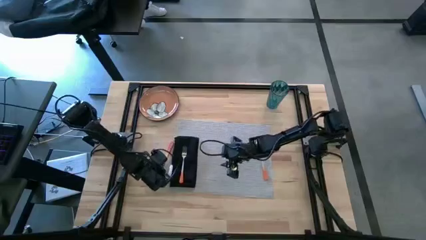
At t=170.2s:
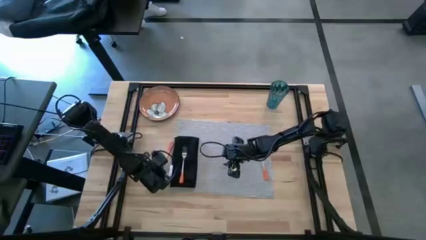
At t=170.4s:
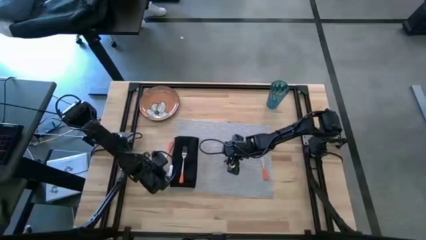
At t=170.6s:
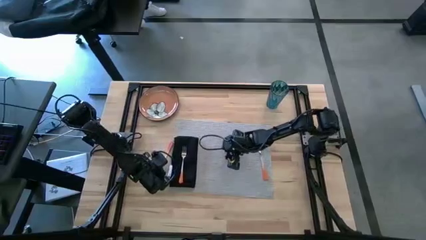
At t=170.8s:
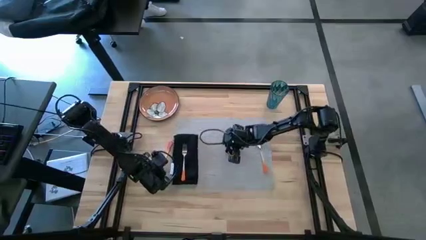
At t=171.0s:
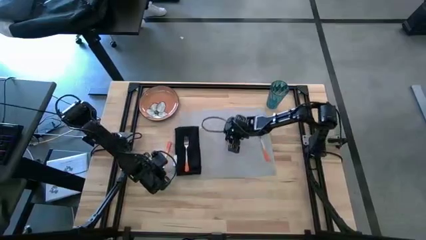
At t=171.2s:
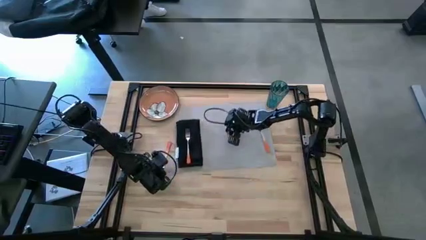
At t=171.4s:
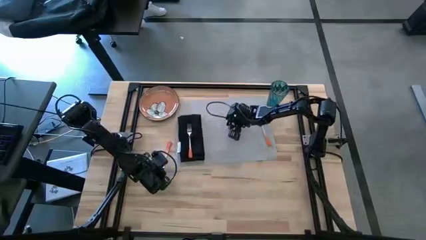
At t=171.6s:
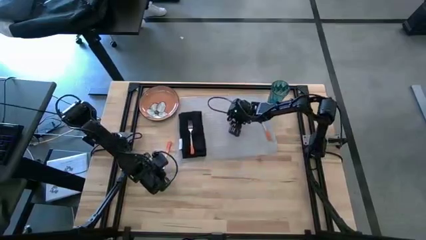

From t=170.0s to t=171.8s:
Task: Set table place
Move the gray table mat to the top of the table in between the green cup and the orange plate

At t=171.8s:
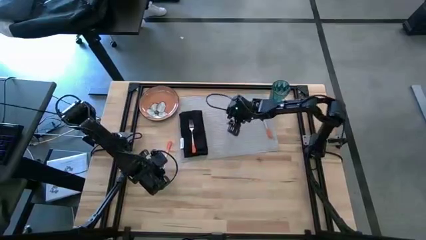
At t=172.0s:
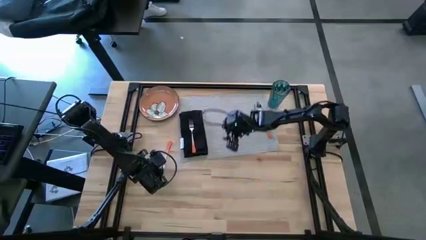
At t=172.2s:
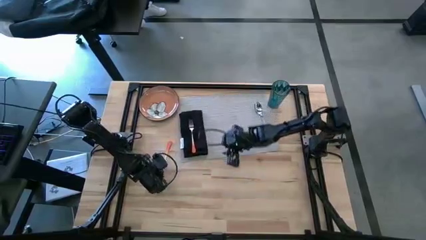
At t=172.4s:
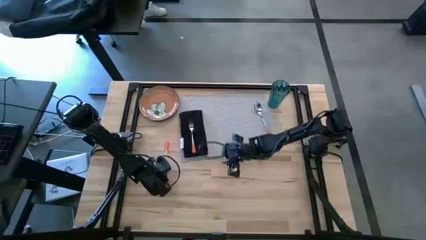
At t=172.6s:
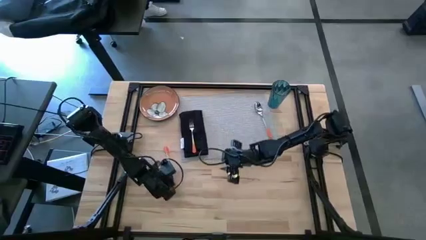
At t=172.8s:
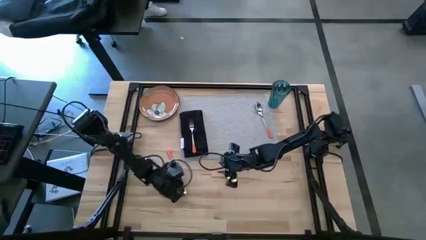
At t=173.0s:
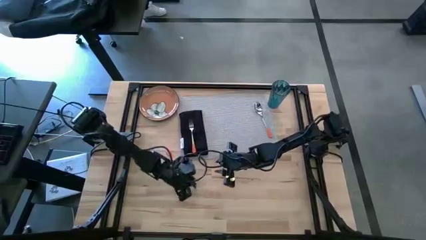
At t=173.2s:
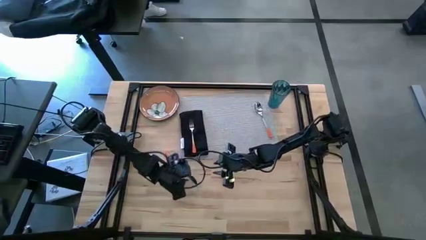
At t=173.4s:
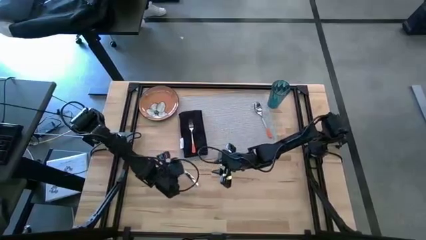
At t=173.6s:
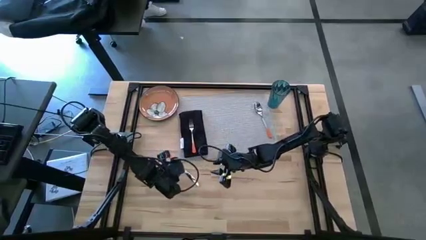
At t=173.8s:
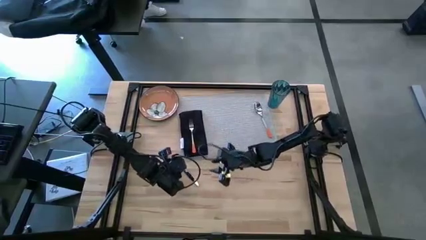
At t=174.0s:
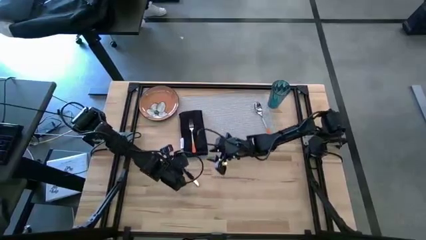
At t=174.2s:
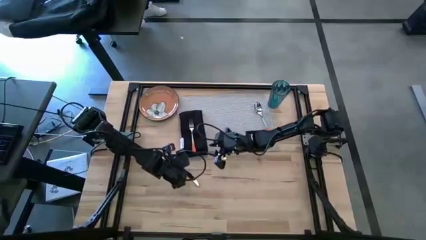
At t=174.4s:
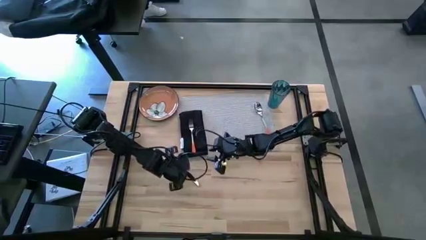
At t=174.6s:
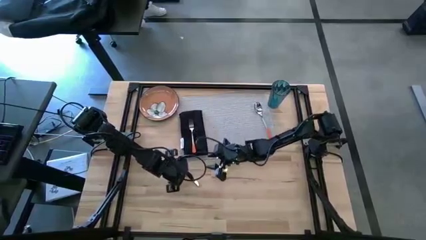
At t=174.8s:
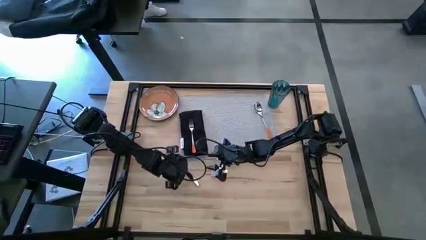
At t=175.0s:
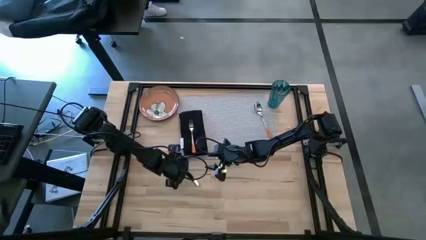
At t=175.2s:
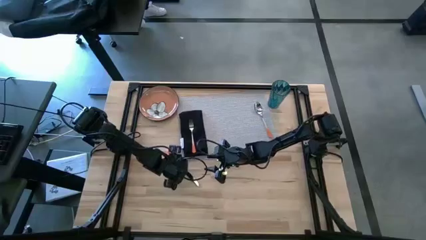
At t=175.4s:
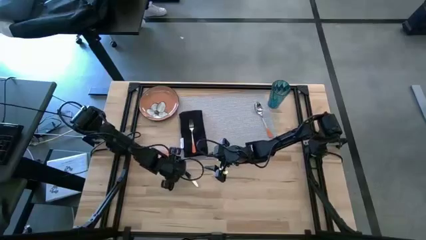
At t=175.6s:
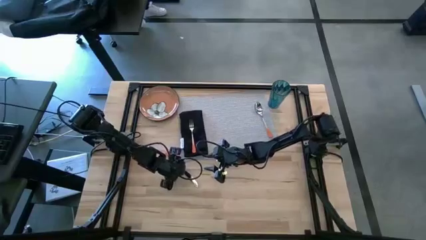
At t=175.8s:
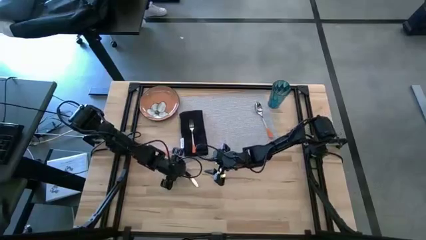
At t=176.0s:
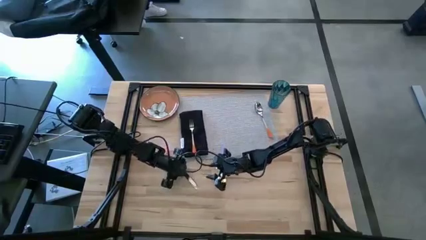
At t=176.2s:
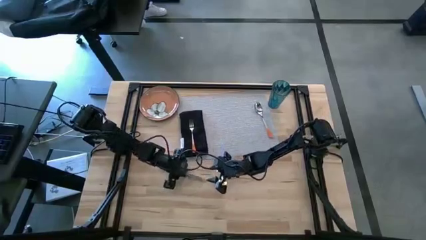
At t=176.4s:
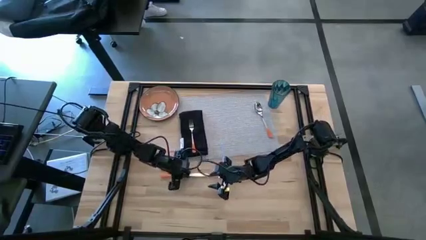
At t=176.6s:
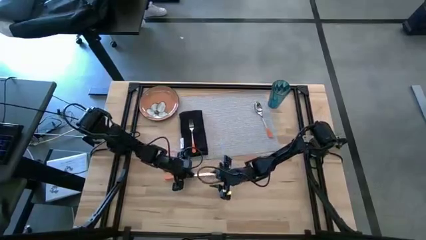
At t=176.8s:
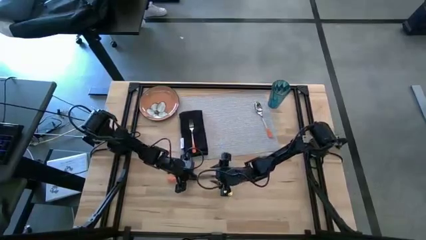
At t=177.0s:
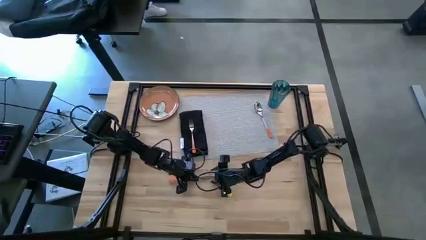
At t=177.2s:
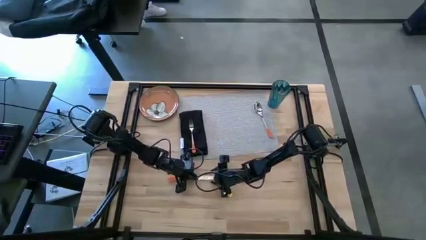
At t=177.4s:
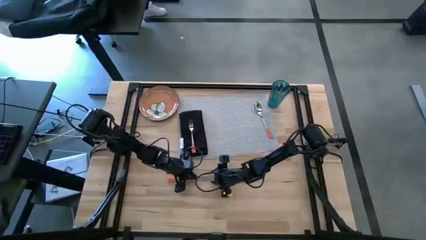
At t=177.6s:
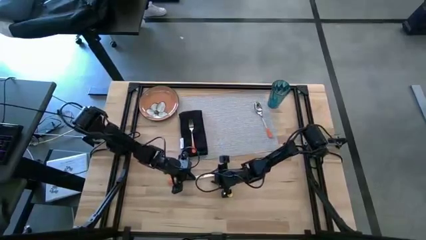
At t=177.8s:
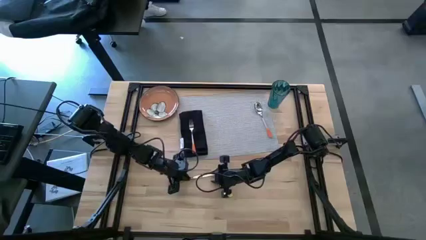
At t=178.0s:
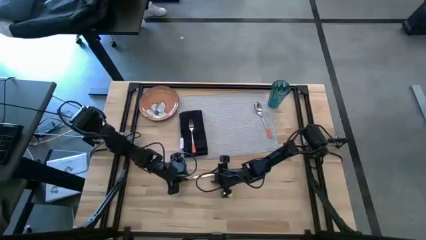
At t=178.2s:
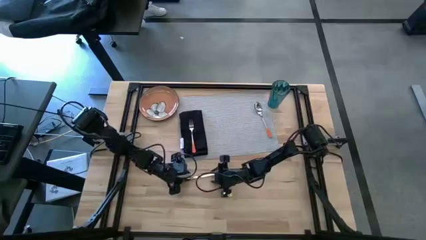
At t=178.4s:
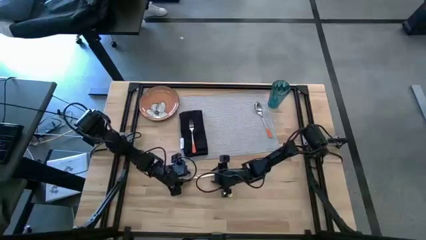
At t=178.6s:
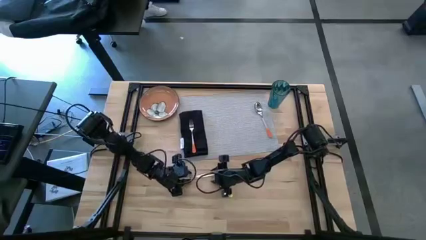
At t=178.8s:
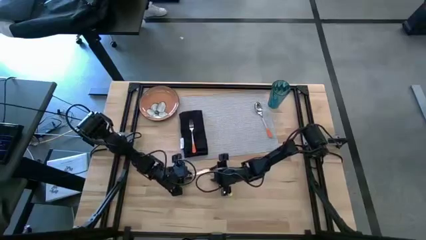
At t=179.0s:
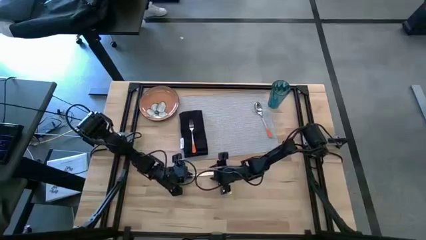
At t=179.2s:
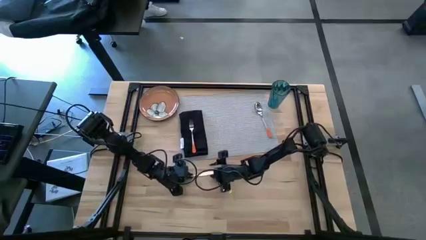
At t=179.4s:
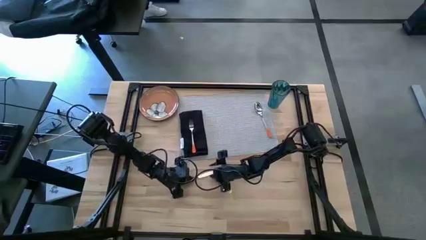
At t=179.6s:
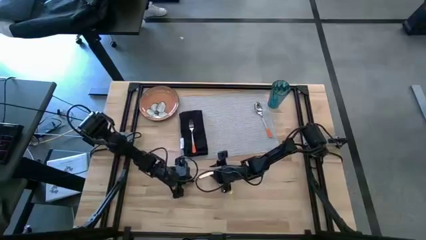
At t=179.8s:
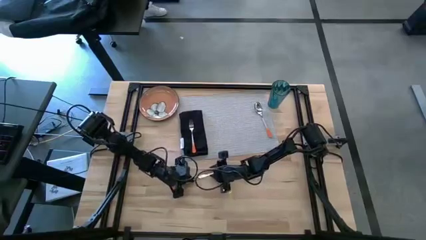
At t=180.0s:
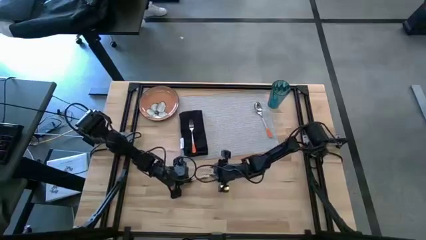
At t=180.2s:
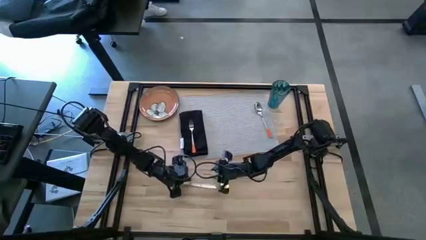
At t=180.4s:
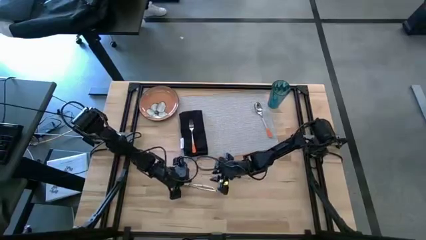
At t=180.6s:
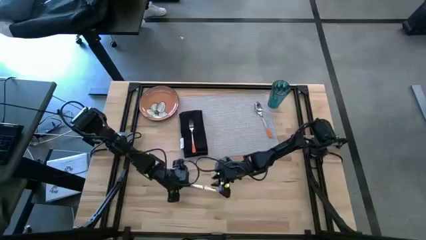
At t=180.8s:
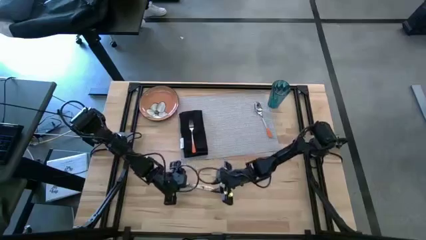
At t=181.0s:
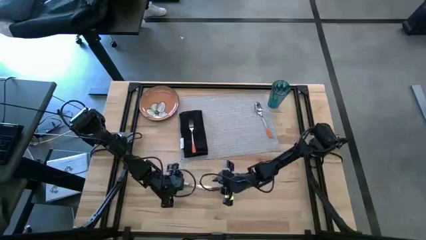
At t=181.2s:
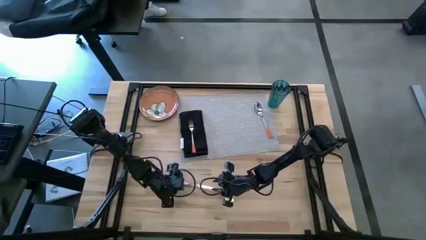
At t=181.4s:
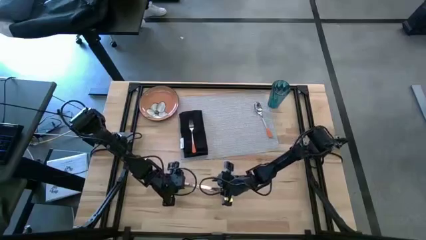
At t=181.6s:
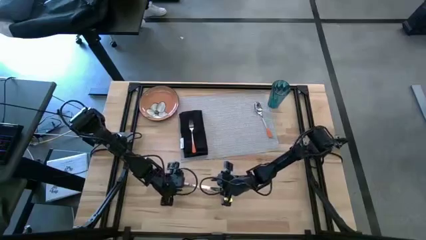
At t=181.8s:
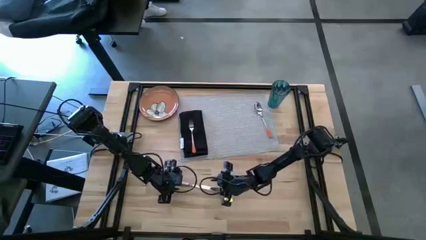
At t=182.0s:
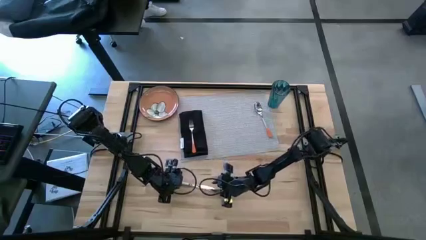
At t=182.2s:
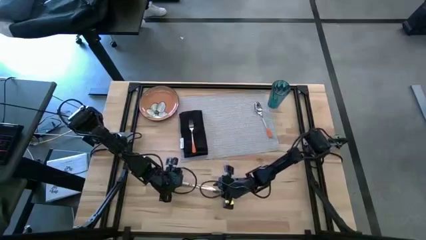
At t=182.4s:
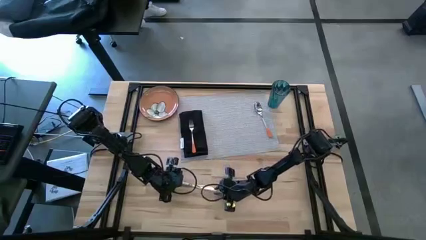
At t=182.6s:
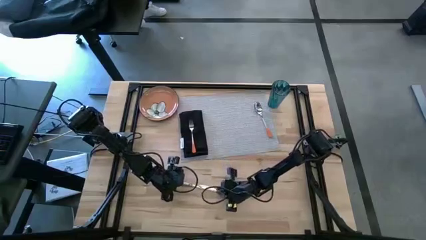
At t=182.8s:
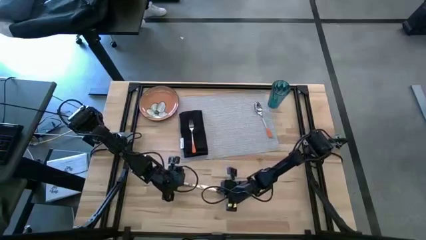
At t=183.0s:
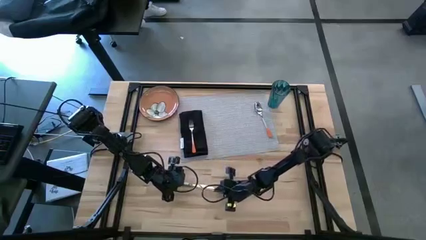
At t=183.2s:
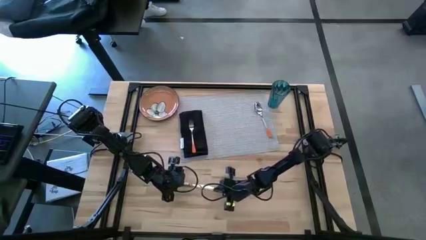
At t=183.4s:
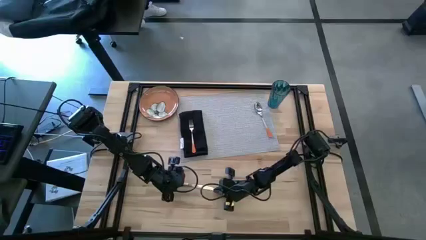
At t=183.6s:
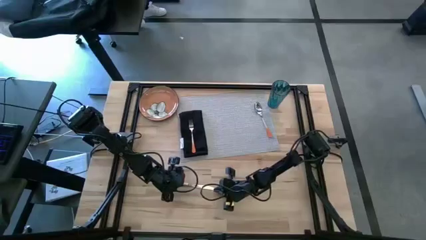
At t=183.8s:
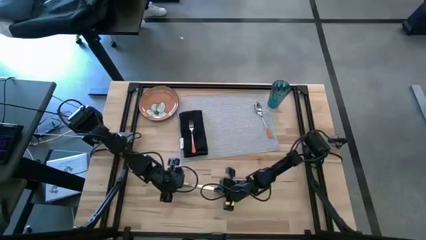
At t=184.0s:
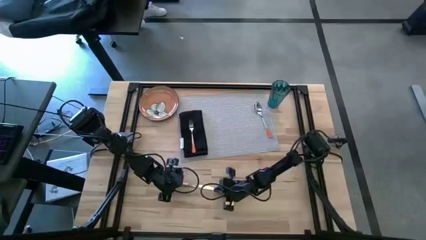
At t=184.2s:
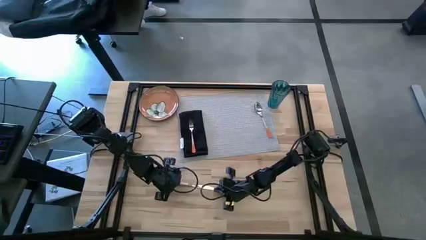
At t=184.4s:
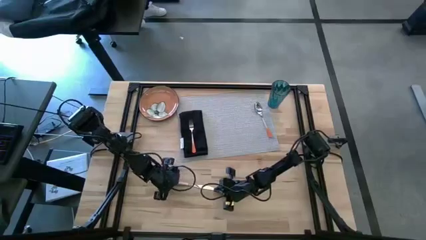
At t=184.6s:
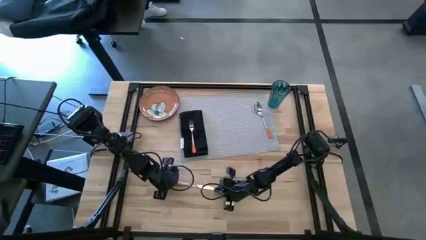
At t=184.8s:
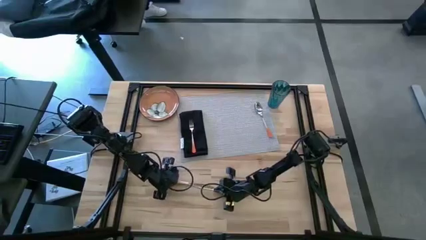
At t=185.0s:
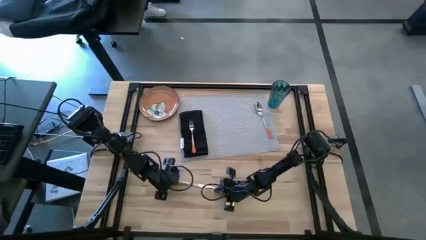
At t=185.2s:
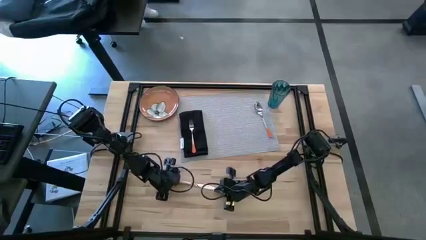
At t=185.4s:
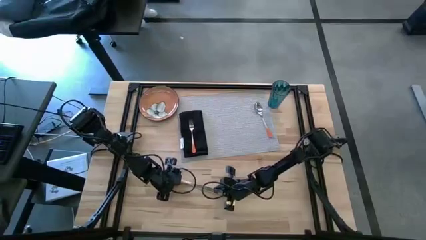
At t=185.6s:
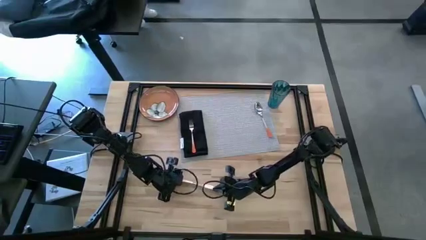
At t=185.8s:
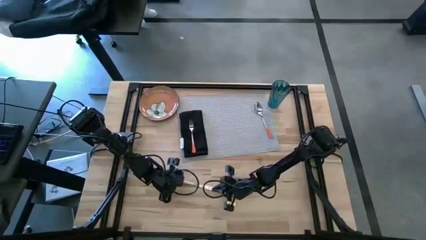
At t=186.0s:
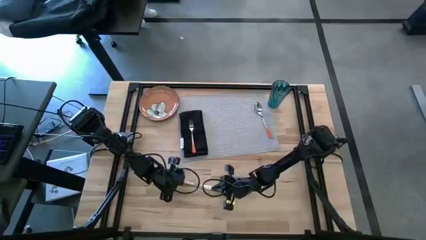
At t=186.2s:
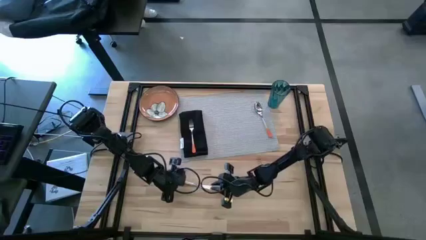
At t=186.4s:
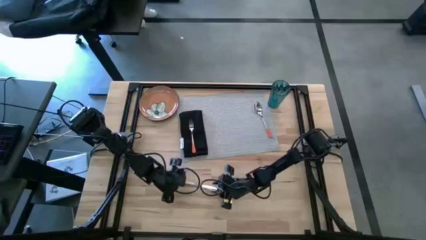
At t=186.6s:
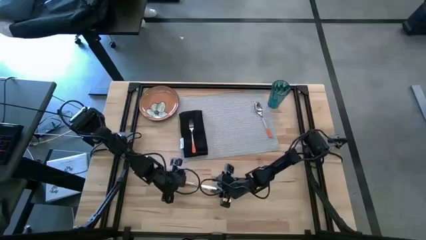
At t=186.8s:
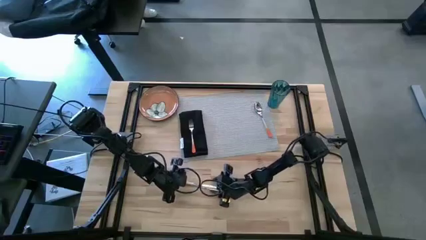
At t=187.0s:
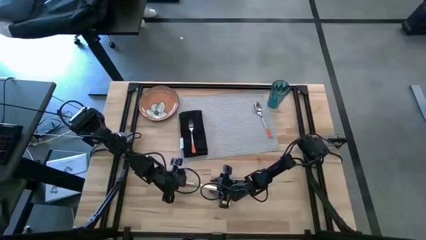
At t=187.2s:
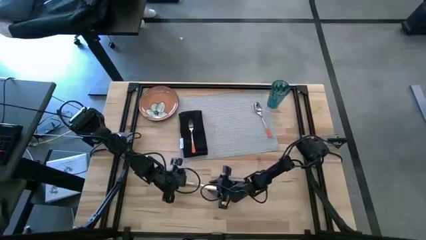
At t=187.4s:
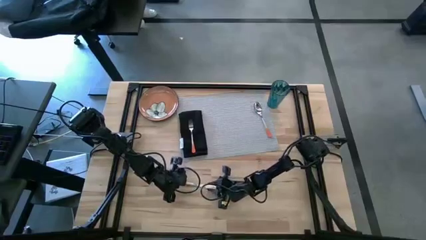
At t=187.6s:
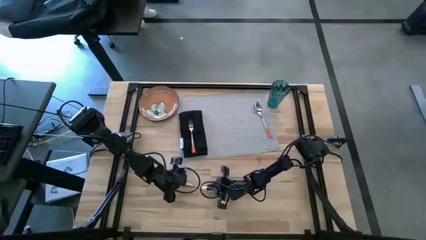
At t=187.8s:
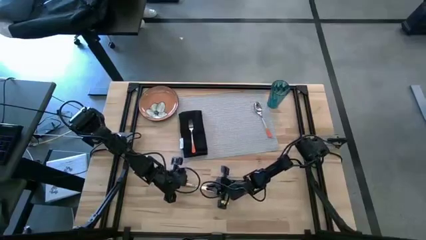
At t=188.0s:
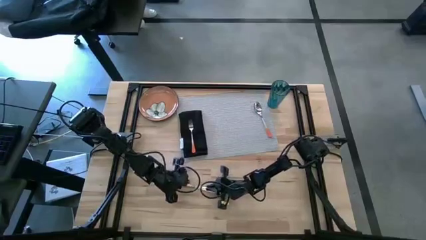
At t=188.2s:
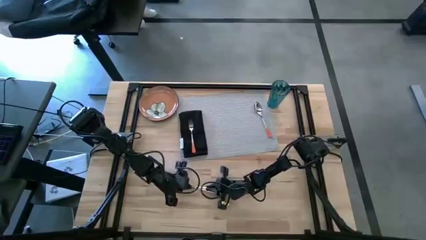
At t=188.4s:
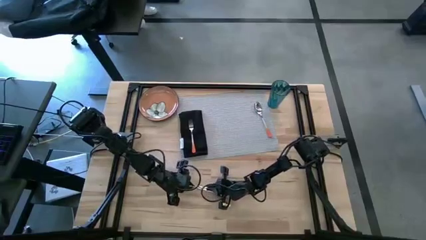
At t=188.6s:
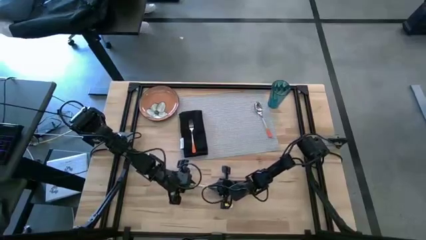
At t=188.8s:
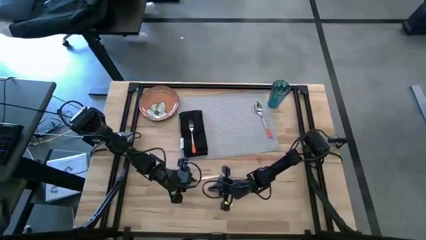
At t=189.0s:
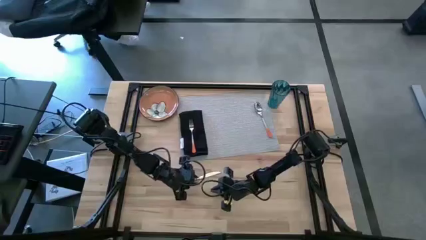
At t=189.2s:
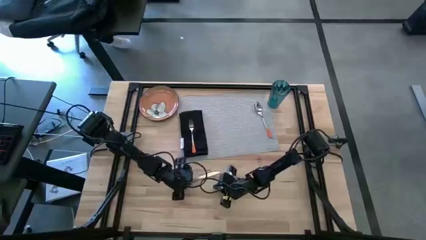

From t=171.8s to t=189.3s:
Put the orange table knife on the gray table mat beside the orange spoon
